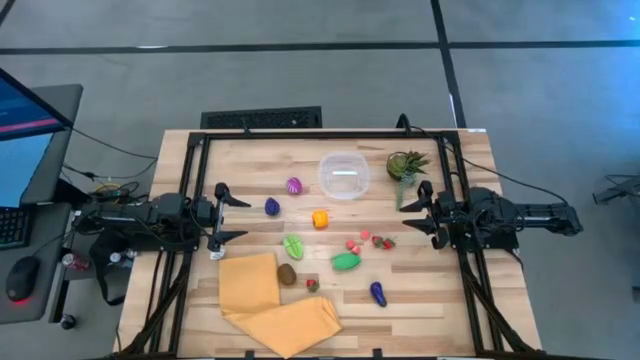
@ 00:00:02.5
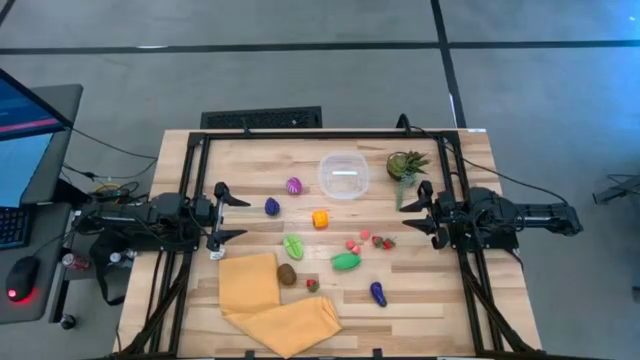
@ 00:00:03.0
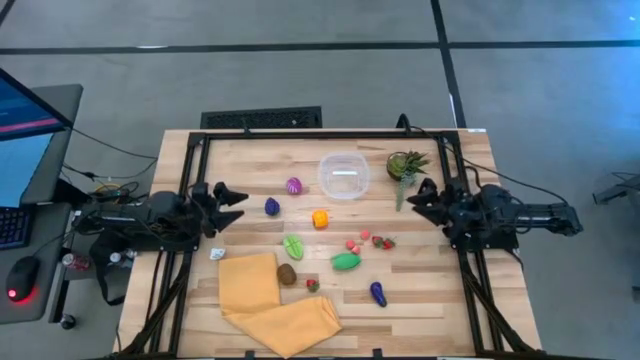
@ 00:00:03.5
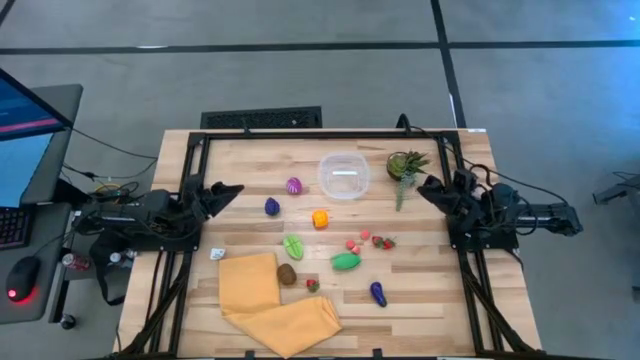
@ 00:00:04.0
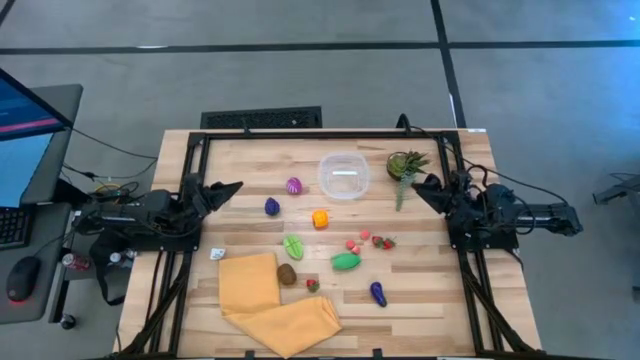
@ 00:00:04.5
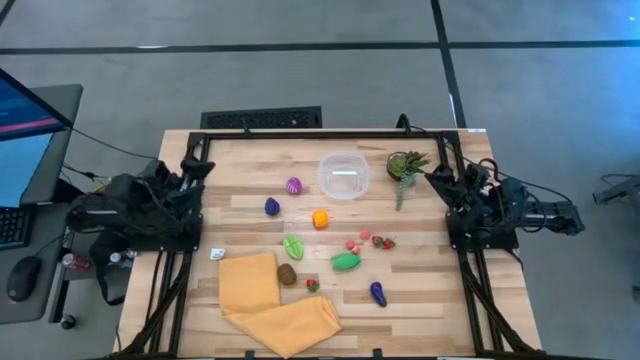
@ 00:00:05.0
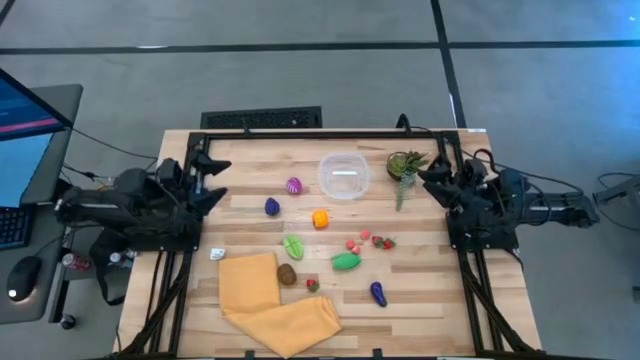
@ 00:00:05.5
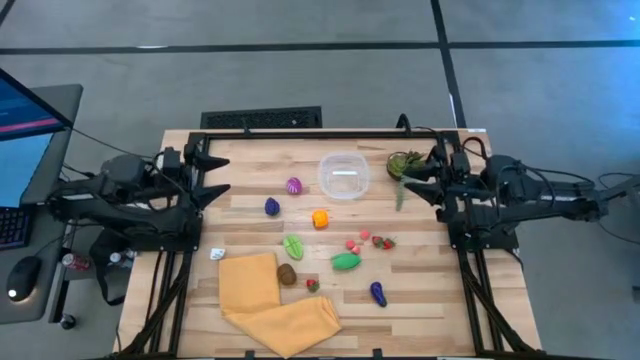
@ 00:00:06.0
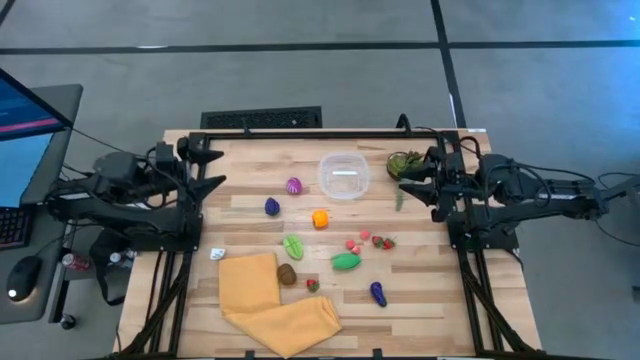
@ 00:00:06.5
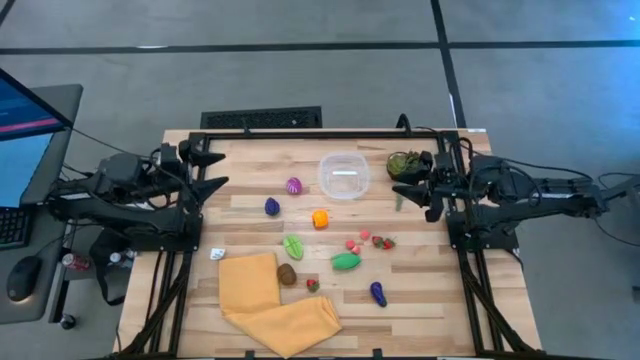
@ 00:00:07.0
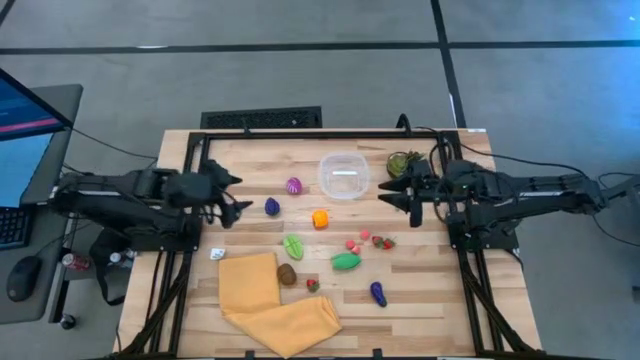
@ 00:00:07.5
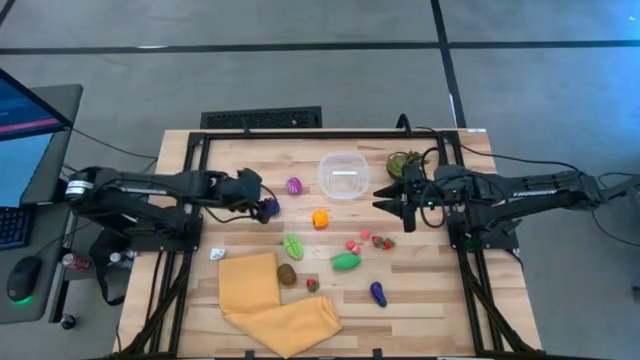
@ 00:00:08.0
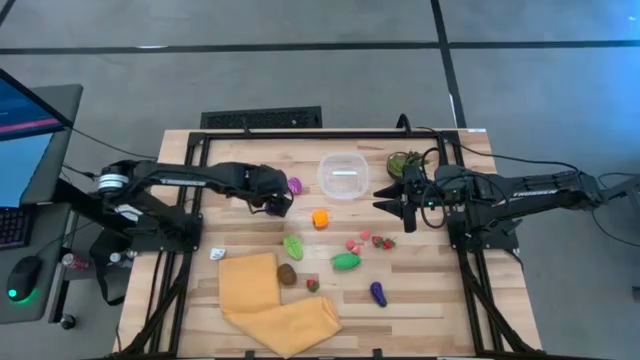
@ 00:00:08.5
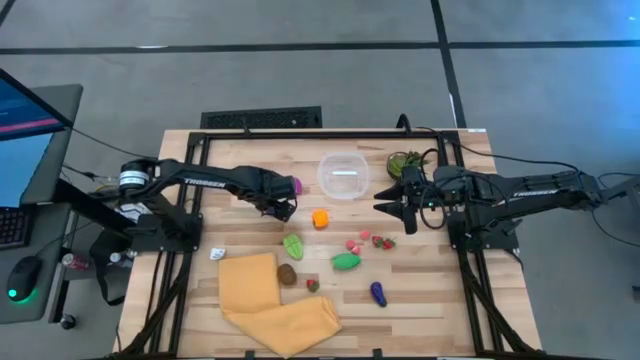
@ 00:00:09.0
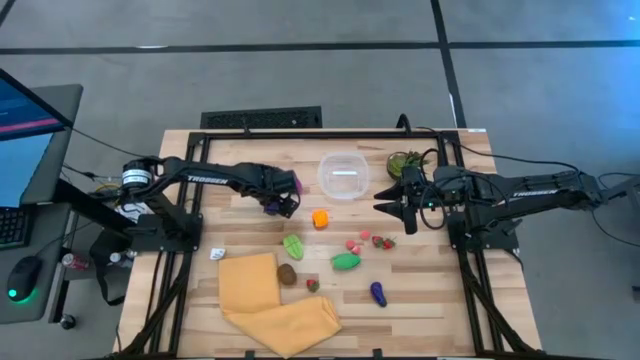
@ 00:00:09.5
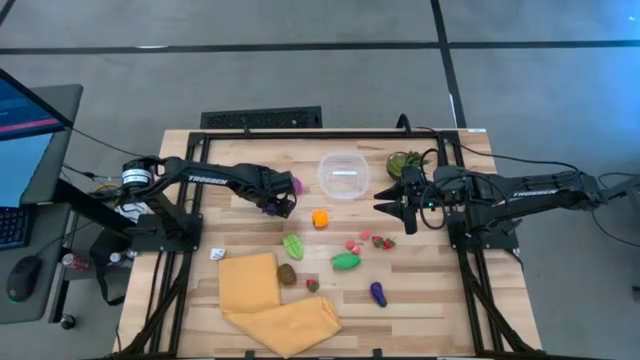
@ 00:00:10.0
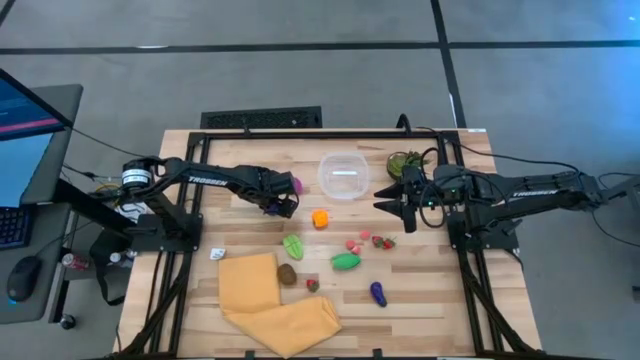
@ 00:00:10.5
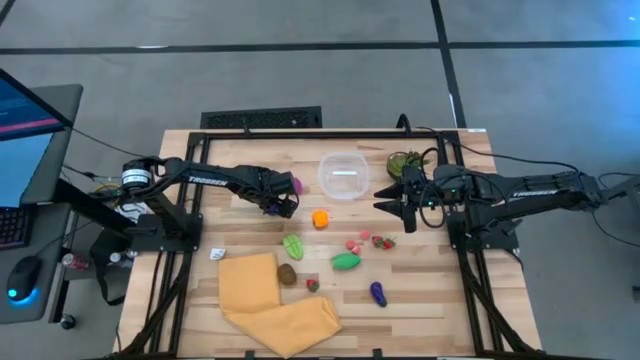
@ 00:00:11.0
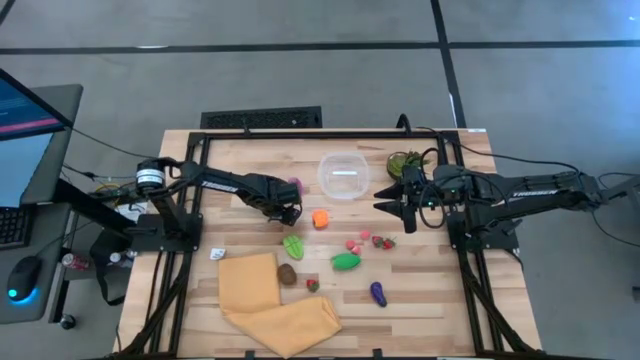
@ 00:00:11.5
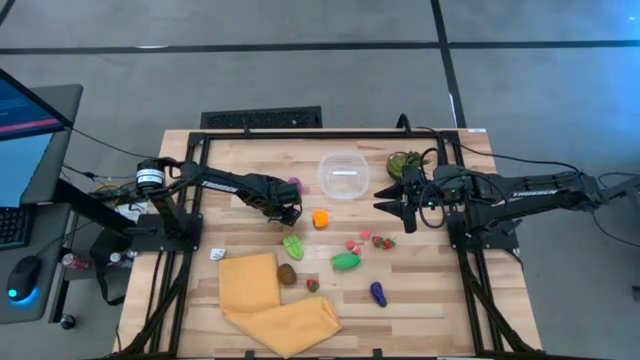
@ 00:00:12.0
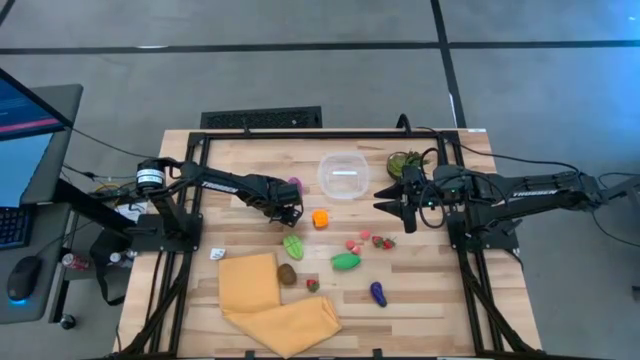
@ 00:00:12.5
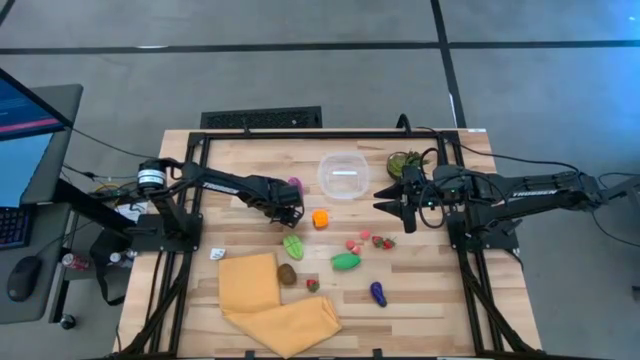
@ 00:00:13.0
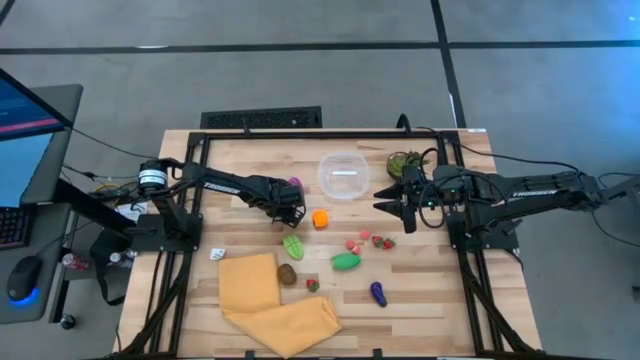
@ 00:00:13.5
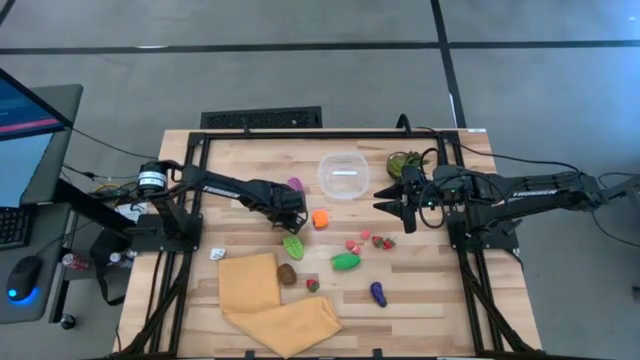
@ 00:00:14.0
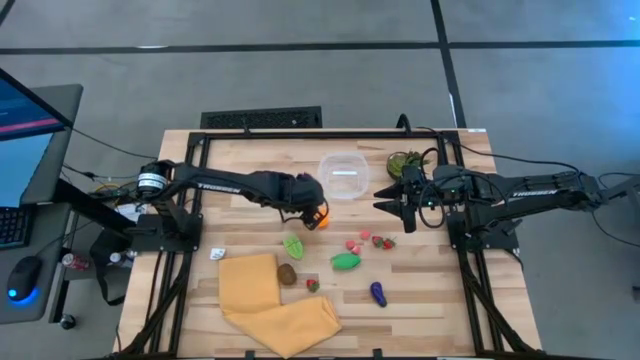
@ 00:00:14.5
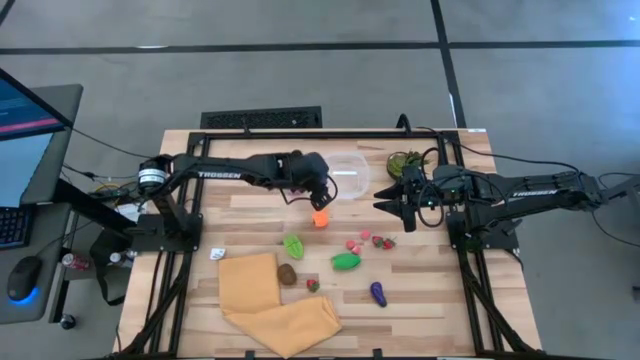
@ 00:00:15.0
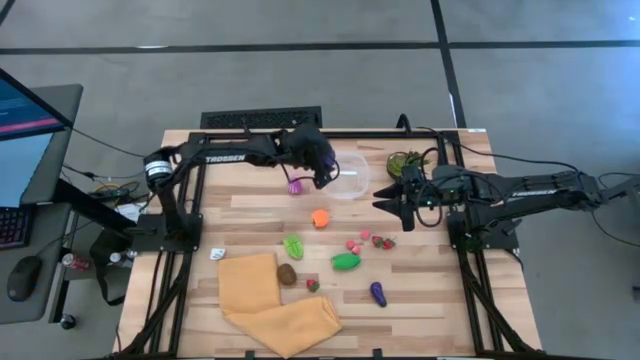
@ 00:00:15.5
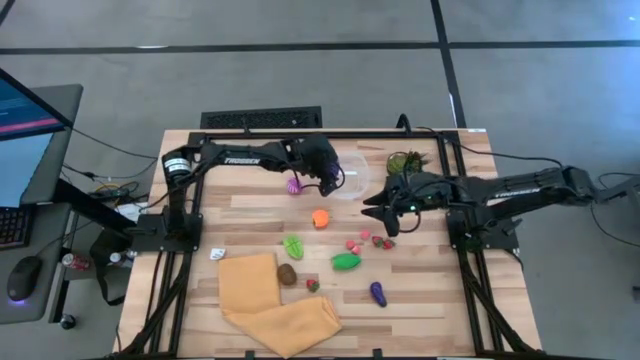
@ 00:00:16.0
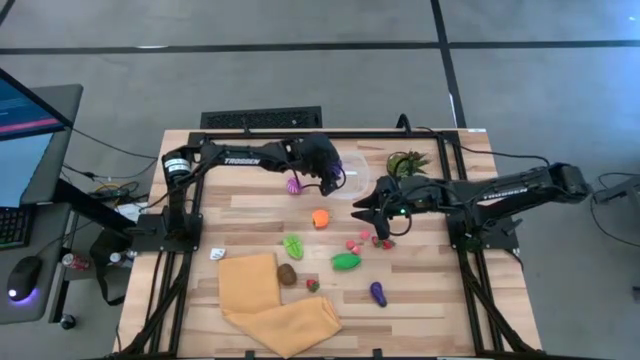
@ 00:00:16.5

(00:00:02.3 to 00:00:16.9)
Task: Pick and placing Produce into tupperware
Put the grapes in the transparent bin

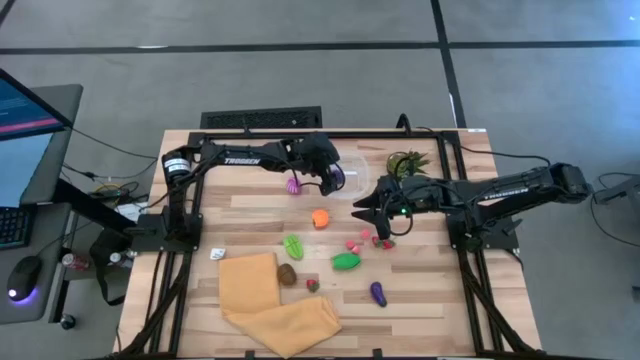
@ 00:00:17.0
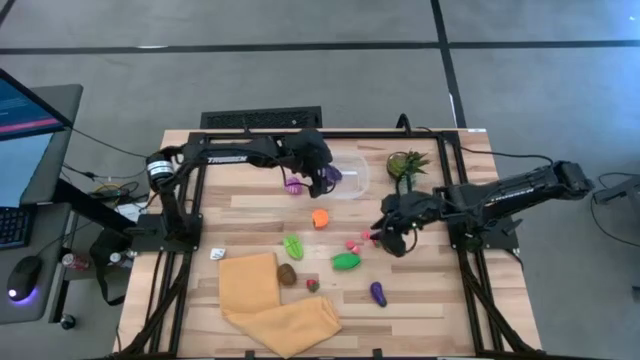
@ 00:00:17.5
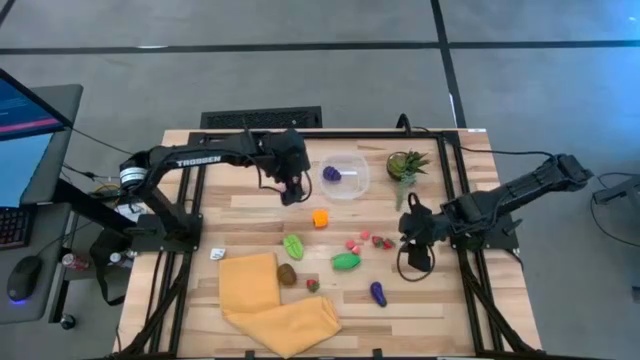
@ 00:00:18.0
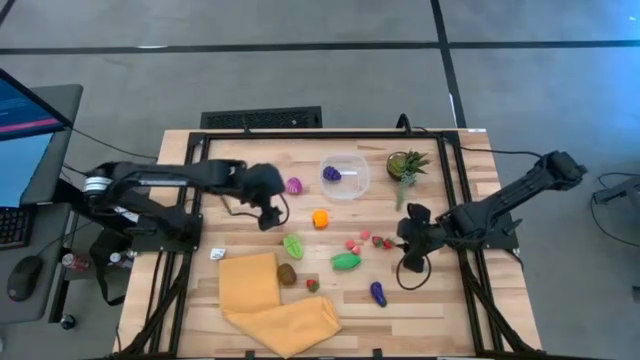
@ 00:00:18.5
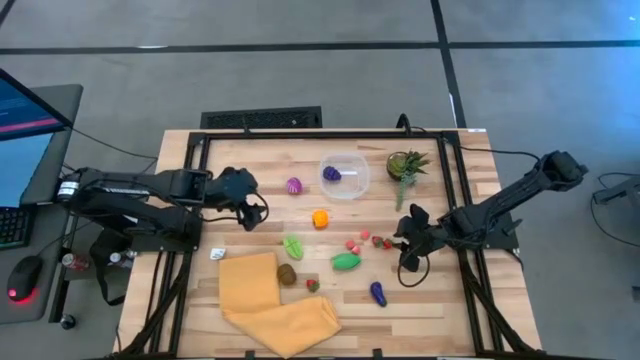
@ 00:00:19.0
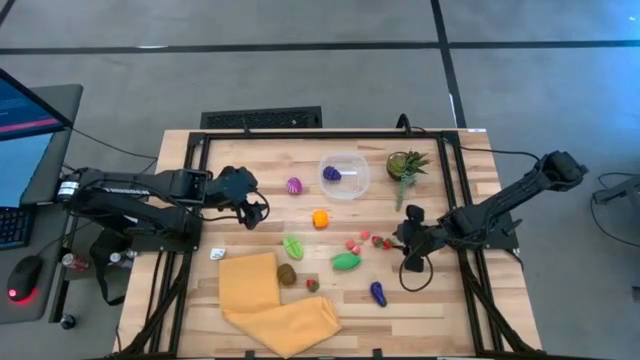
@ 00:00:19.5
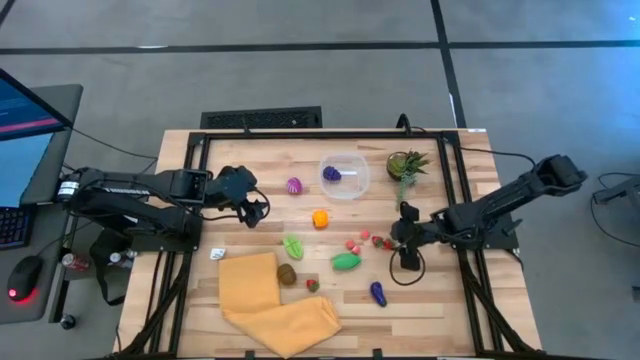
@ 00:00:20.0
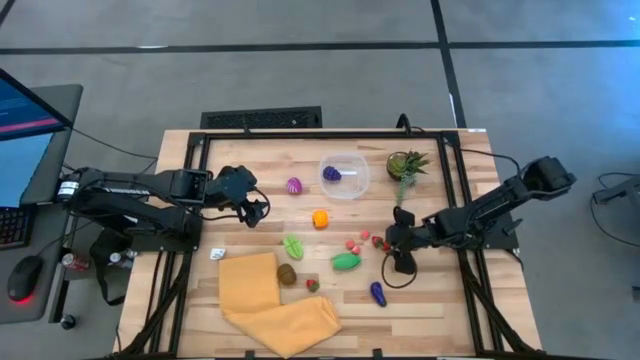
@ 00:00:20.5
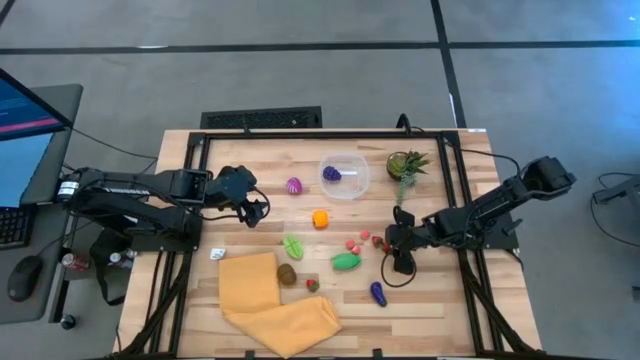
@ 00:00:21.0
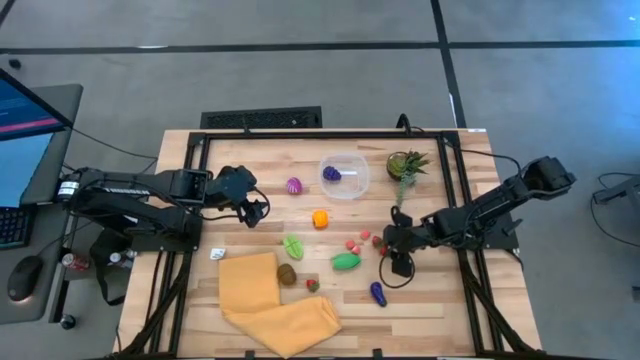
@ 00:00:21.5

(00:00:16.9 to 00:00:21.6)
Put the right strawberry in the transparent bin
